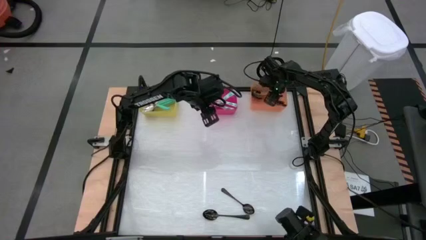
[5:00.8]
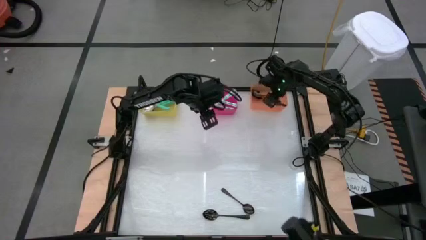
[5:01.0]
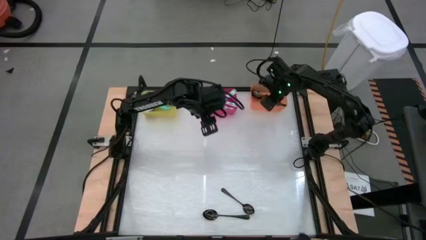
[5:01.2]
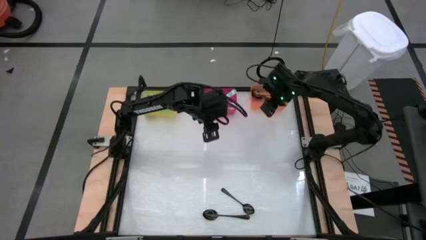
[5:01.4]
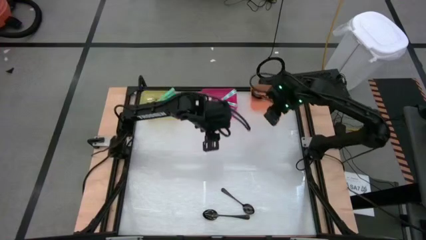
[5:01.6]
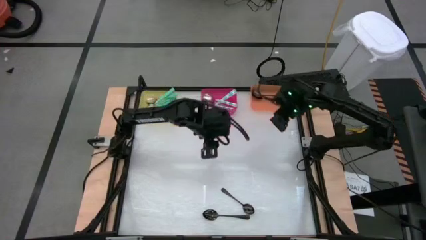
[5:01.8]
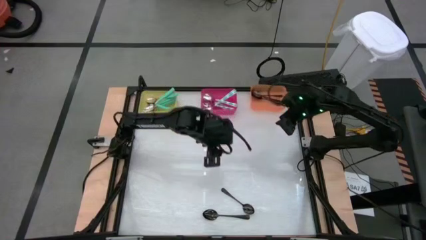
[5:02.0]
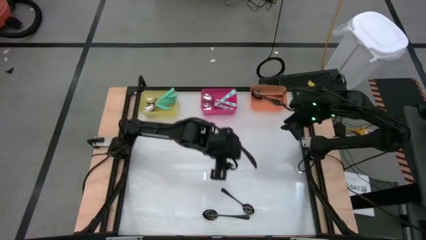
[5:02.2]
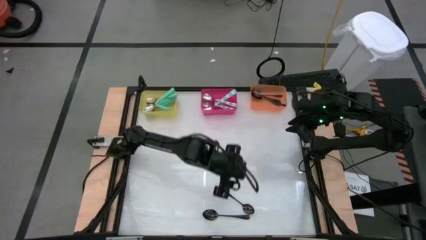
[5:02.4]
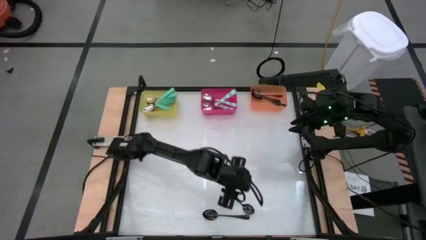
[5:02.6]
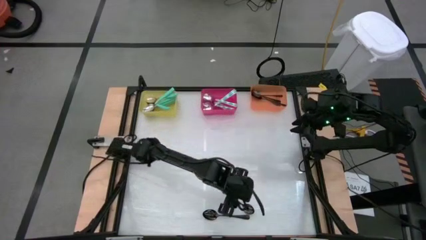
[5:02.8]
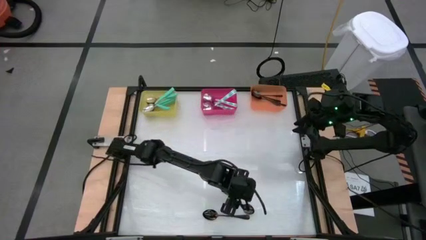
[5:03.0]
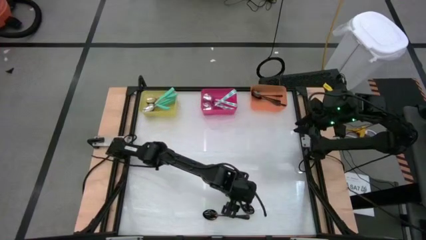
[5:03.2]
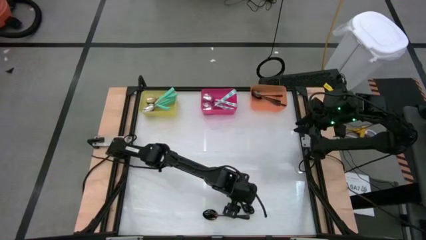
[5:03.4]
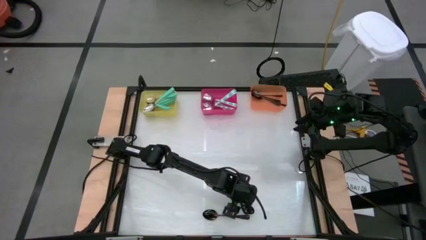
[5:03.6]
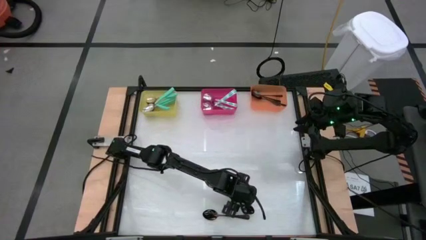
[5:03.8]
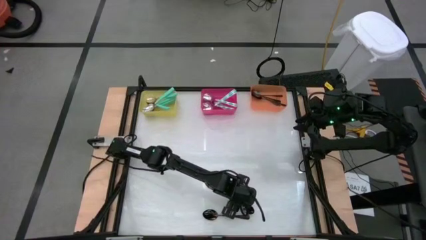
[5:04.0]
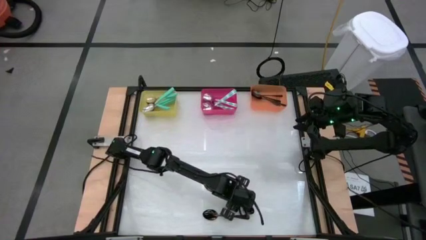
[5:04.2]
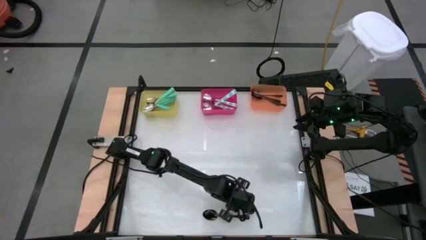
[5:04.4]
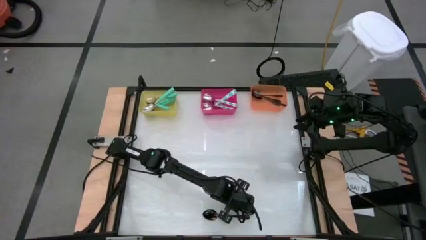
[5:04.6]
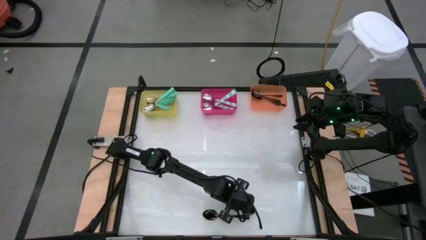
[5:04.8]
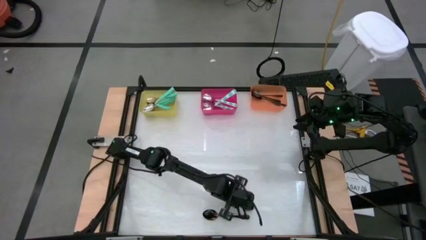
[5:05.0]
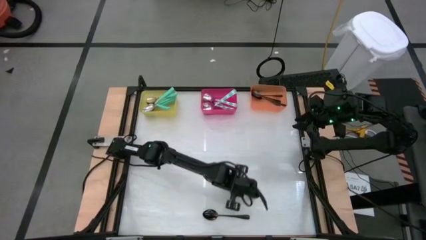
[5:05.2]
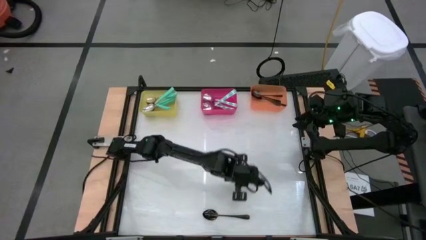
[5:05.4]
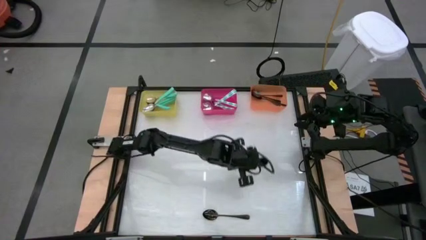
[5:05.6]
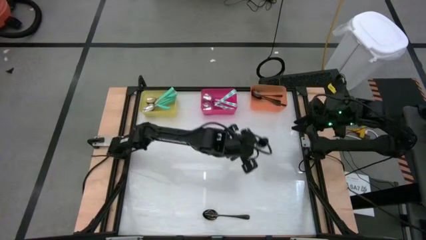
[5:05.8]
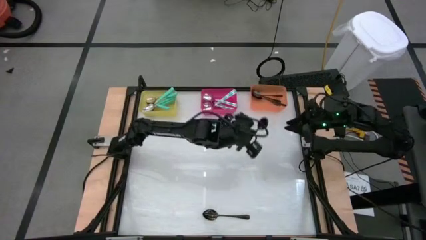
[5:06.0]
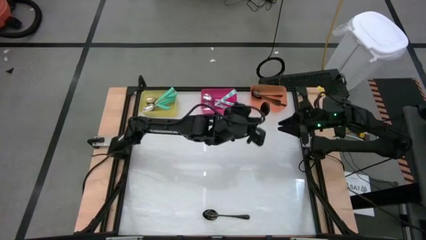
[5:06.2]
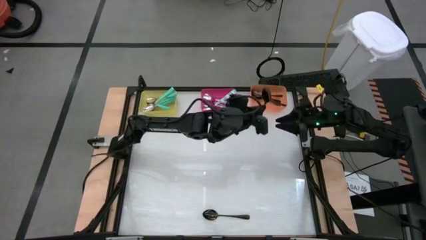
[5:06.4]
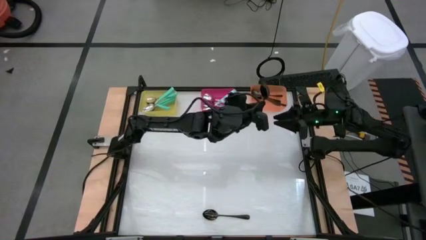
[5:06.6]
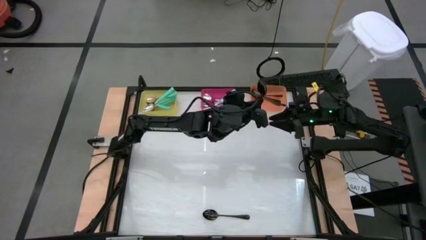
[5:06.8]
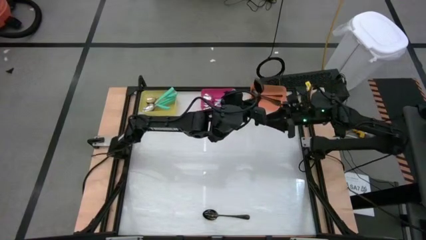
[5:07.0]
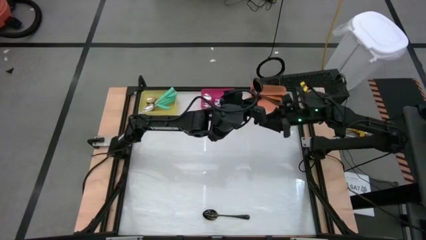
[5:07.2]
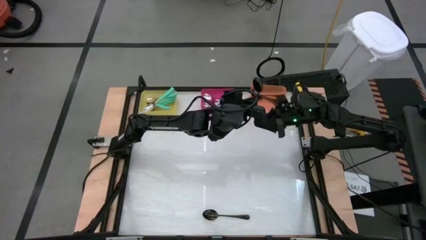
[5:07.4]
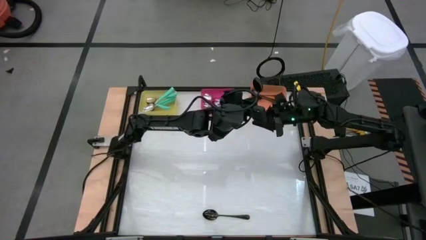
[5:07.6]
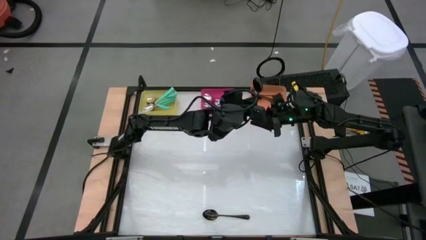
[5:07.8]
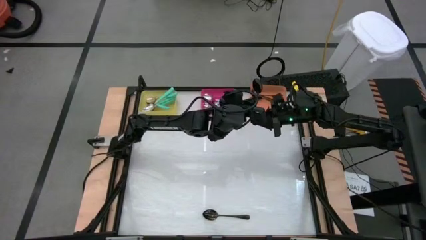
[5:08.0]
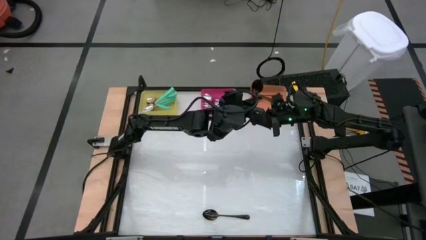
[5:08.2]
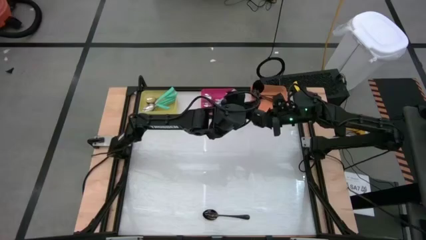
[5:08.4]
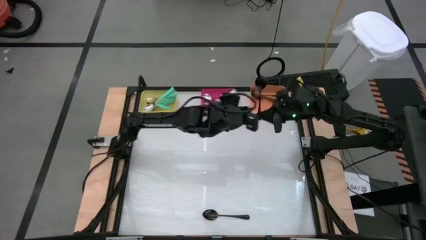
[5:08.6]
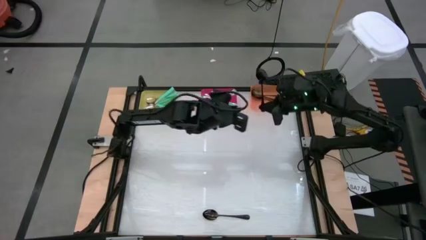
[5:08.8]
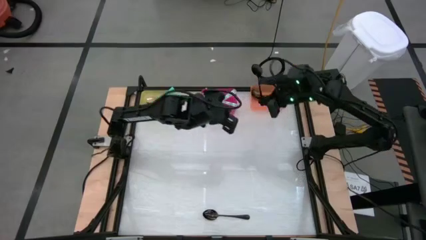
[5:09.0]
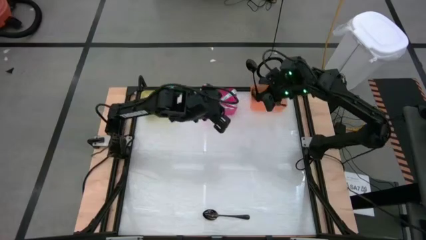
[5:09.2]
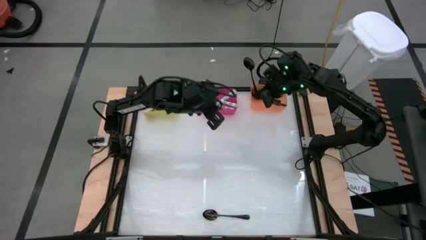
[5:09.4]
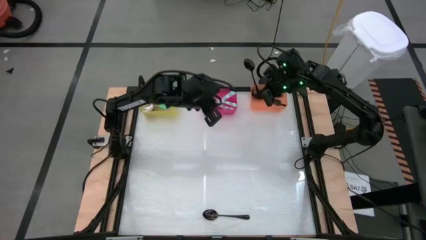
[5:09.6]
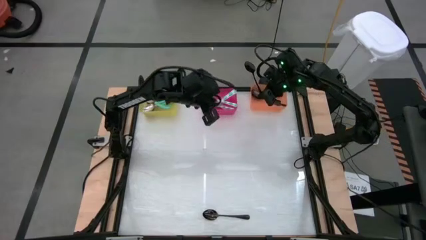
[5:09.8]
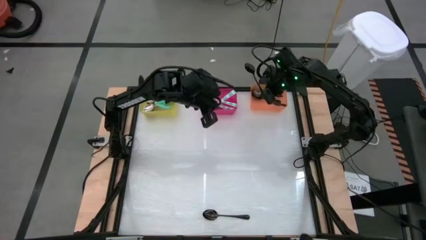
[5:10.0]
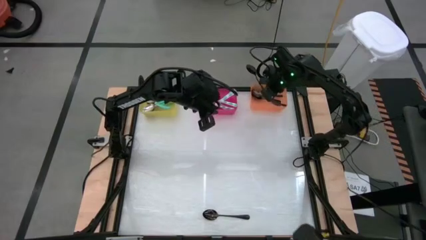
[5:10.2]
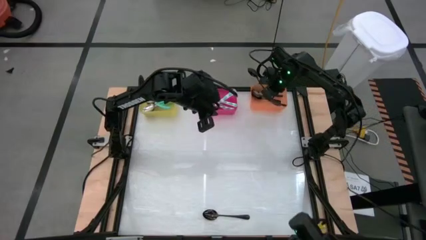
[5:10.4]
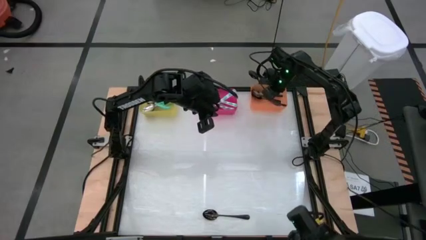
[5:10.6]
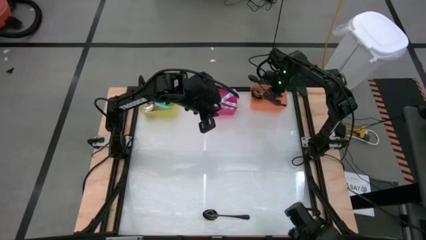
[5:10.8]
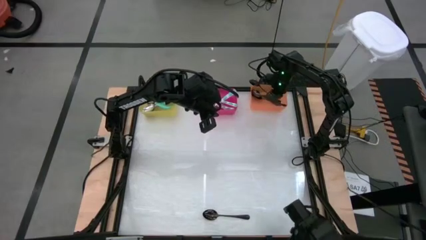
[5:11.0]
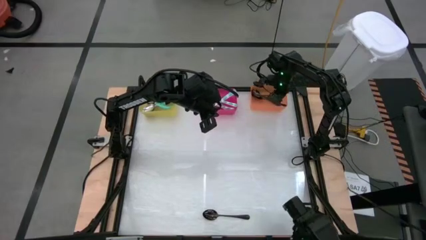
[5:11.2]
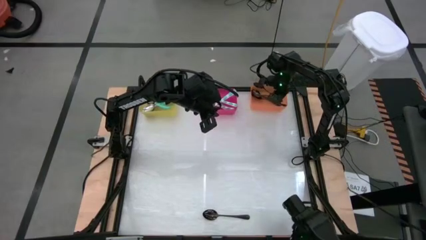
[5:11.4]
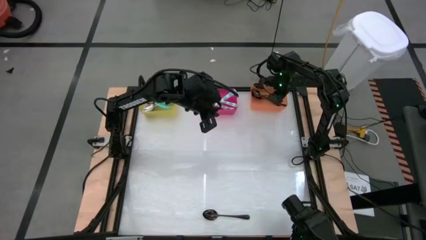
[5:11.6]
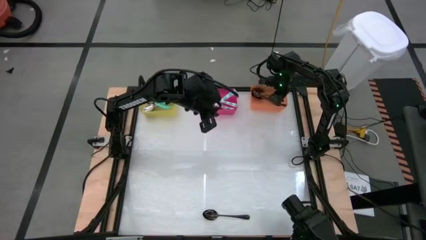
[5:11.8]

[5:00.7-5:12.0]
Task: Sort silverware by color (type)
Put the black spoon into the orange bin
